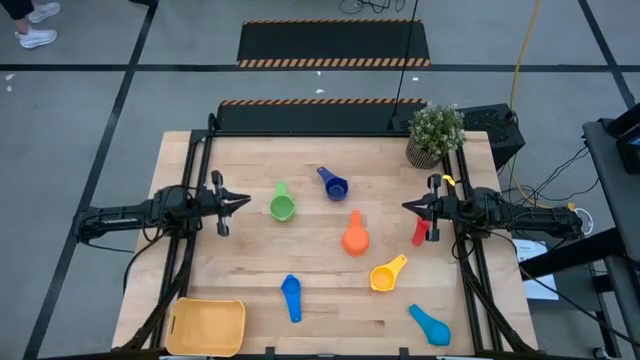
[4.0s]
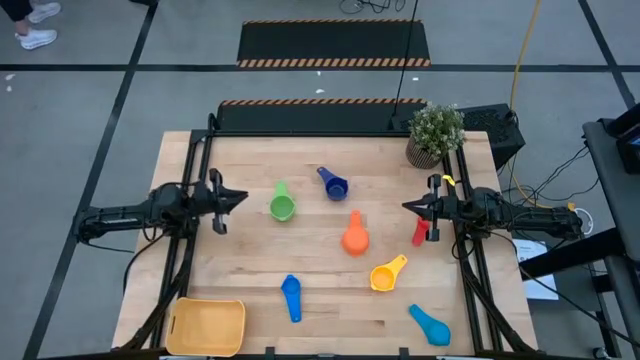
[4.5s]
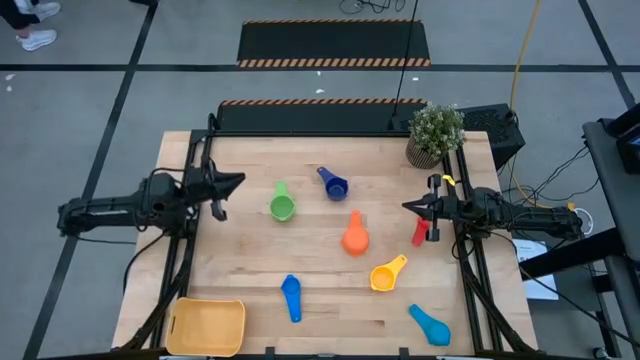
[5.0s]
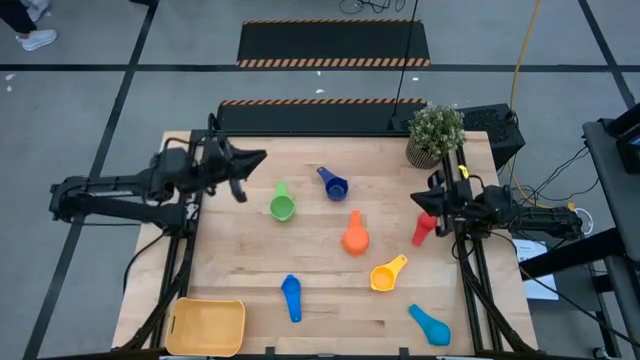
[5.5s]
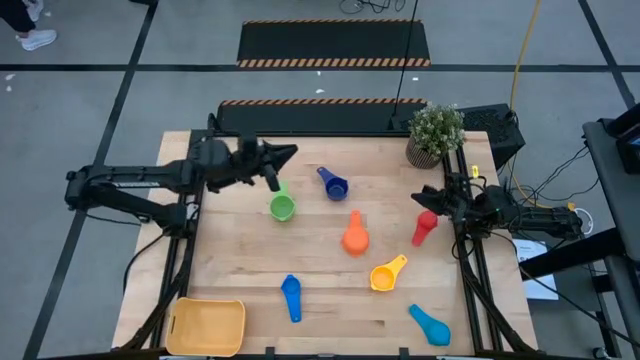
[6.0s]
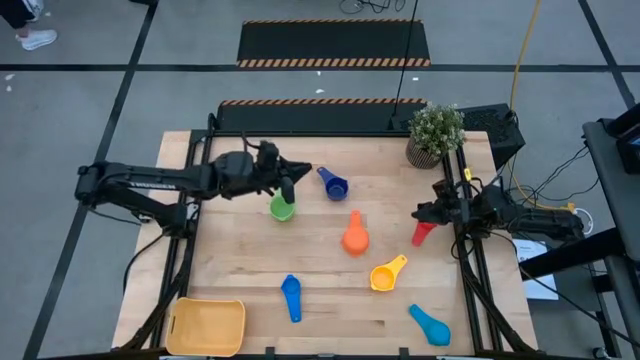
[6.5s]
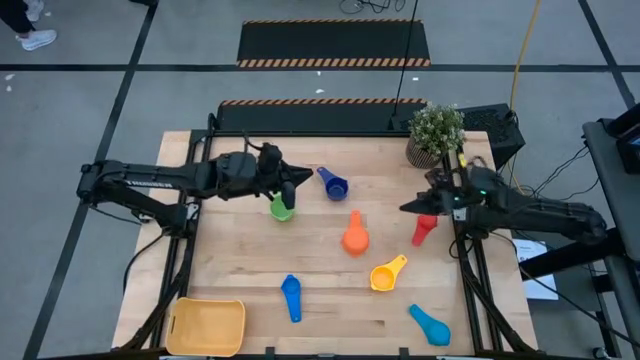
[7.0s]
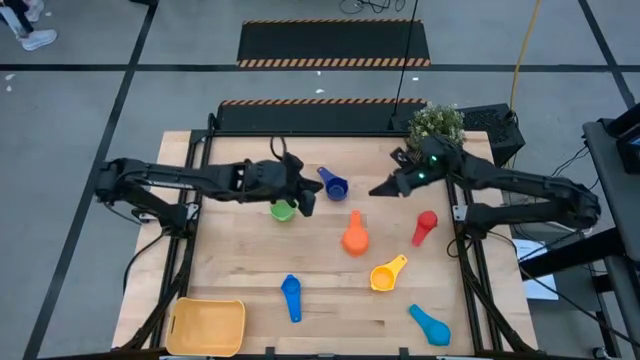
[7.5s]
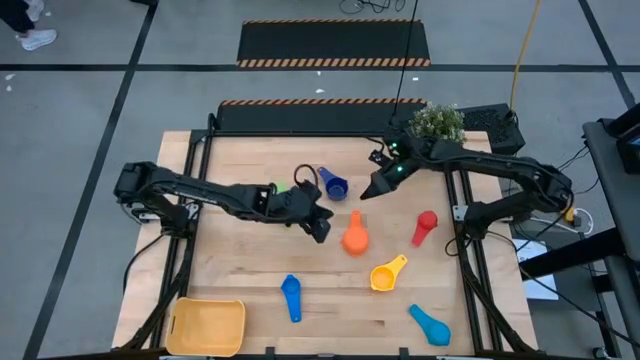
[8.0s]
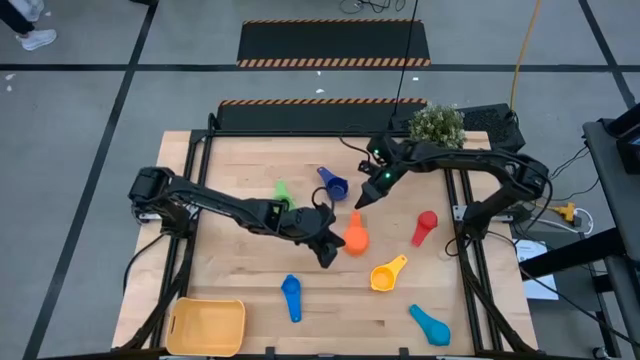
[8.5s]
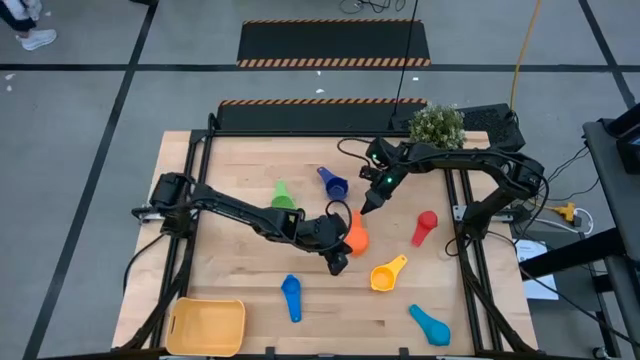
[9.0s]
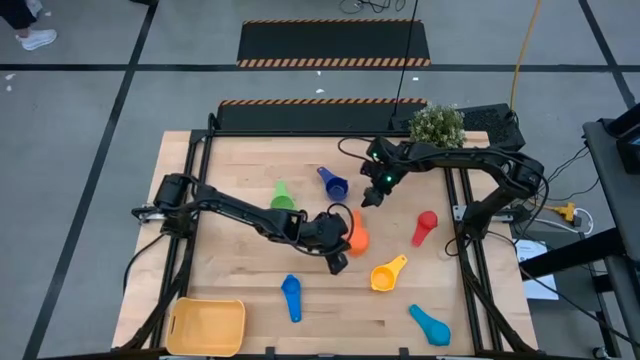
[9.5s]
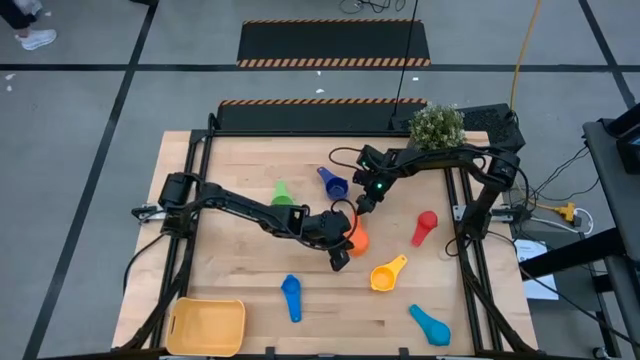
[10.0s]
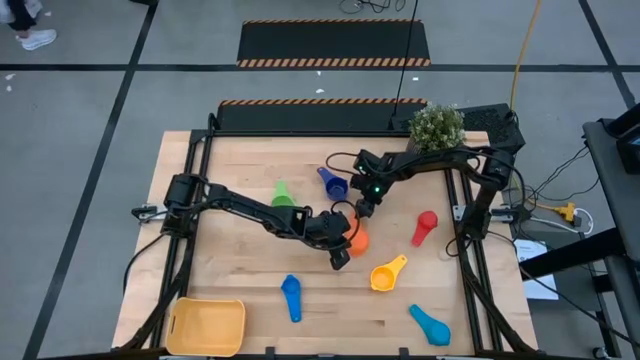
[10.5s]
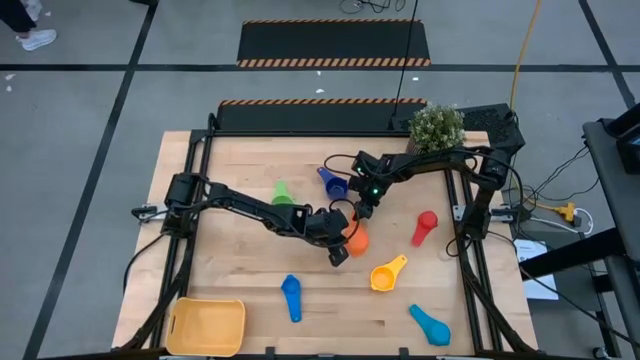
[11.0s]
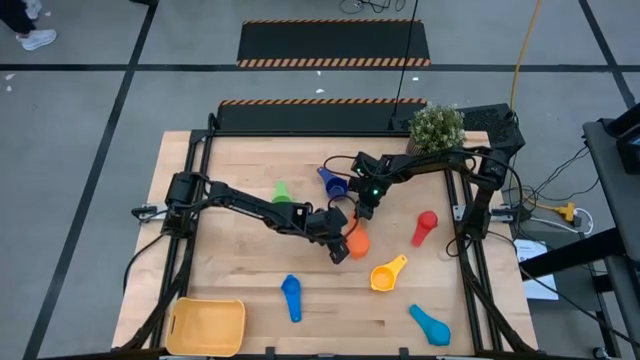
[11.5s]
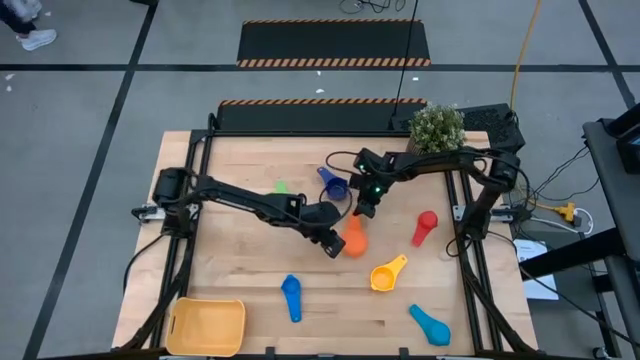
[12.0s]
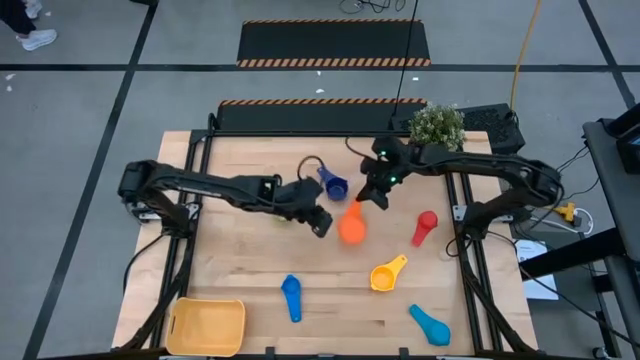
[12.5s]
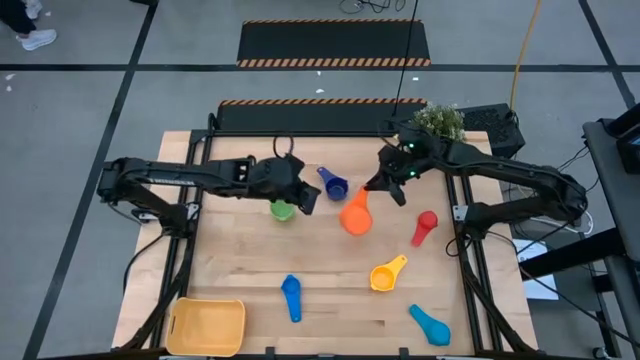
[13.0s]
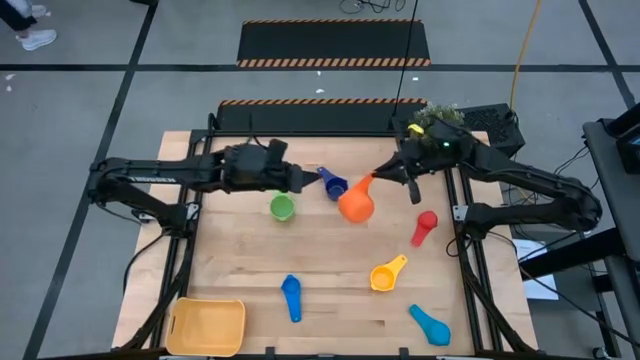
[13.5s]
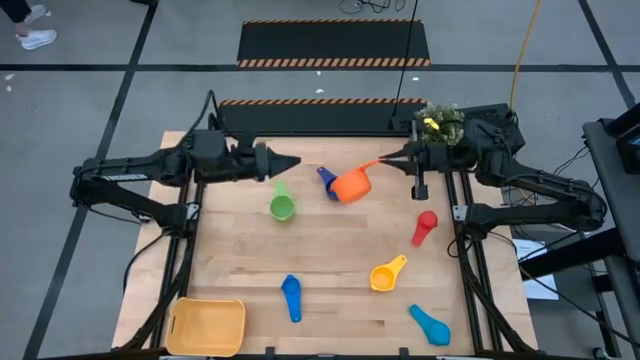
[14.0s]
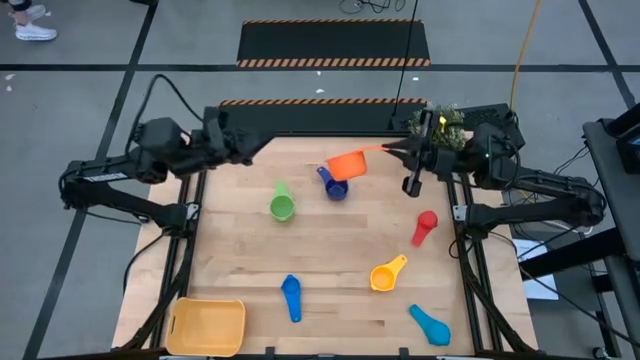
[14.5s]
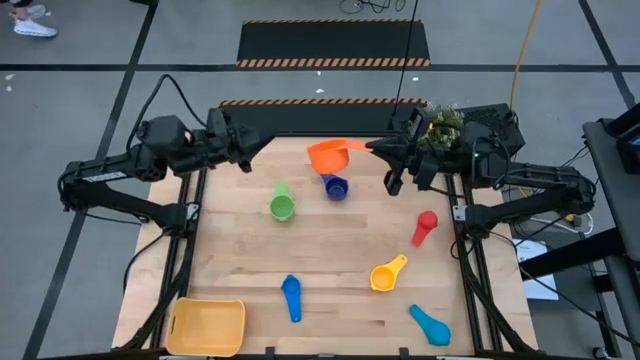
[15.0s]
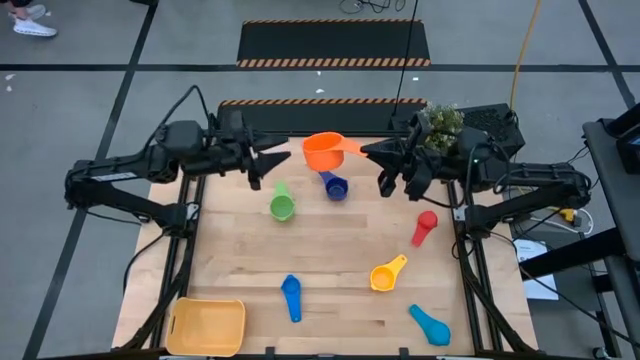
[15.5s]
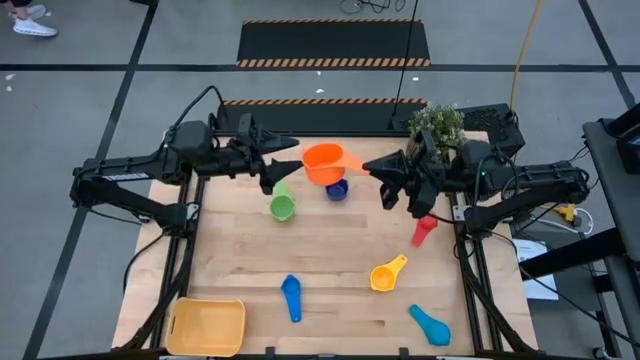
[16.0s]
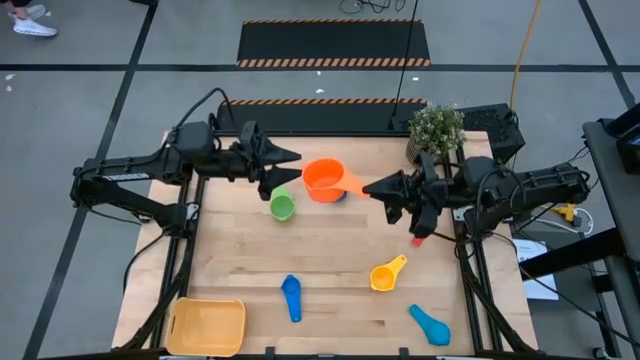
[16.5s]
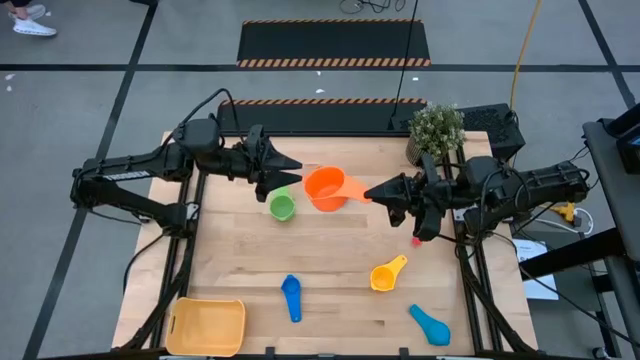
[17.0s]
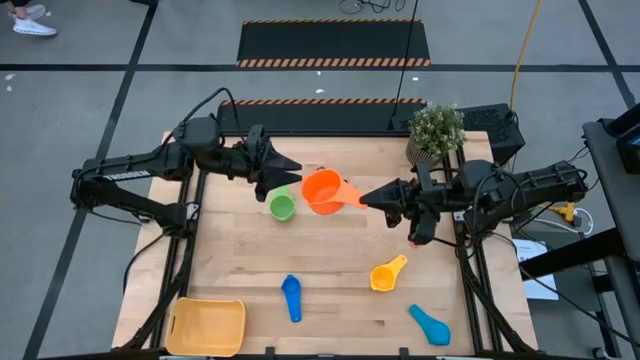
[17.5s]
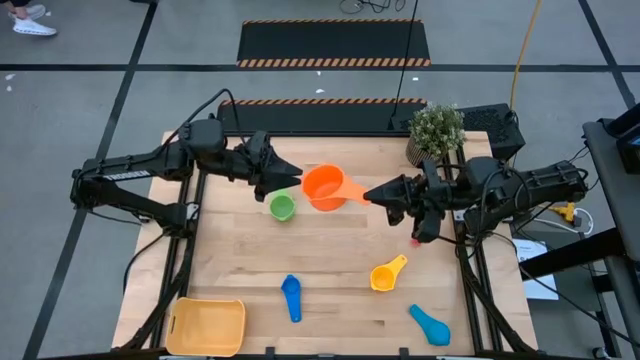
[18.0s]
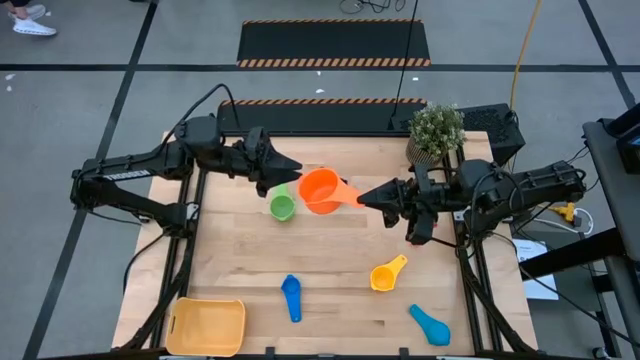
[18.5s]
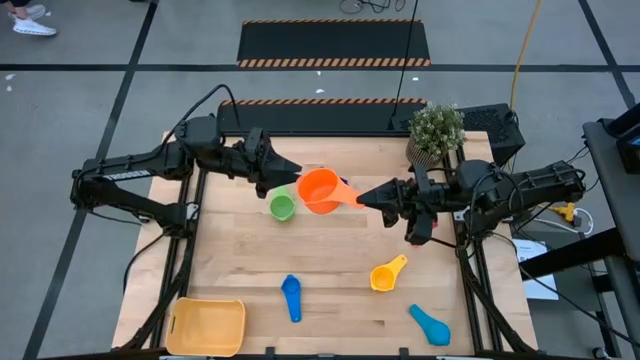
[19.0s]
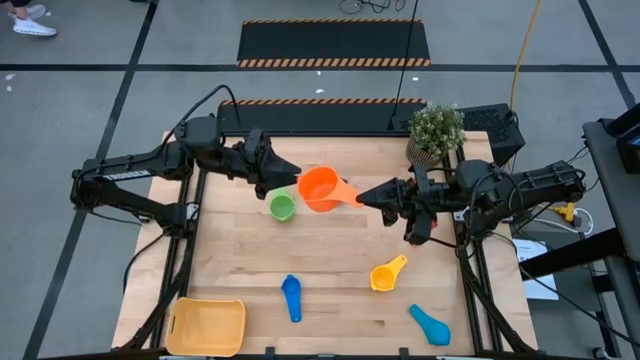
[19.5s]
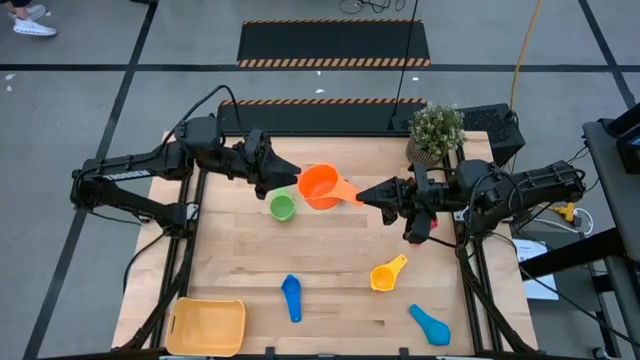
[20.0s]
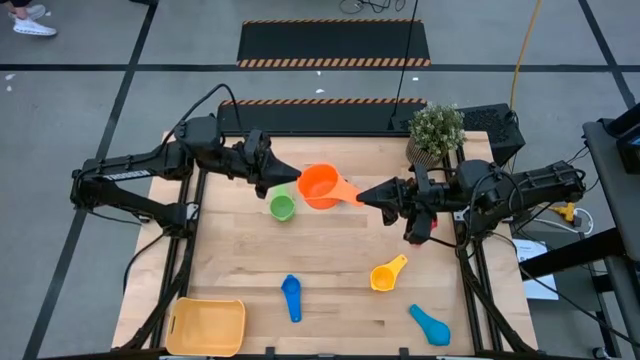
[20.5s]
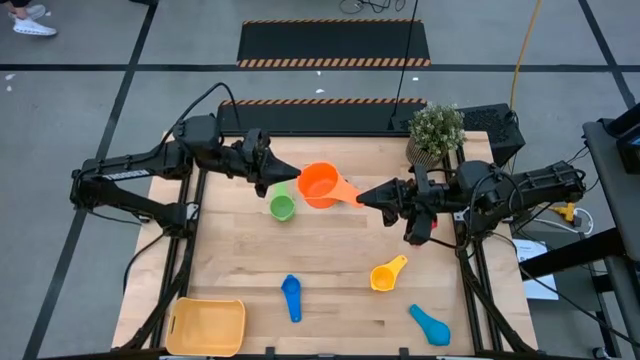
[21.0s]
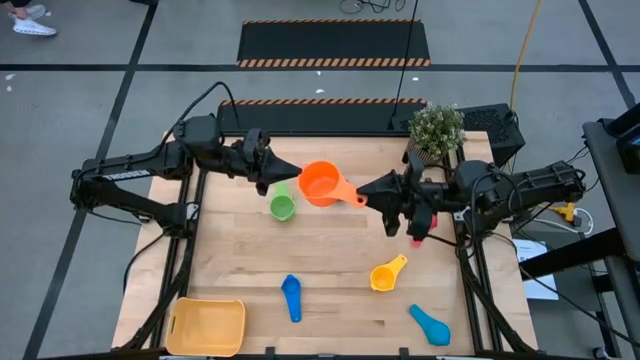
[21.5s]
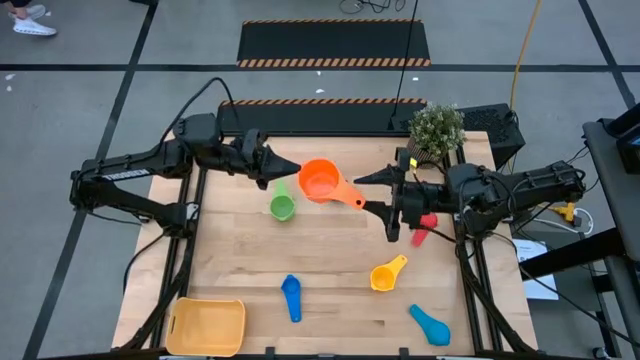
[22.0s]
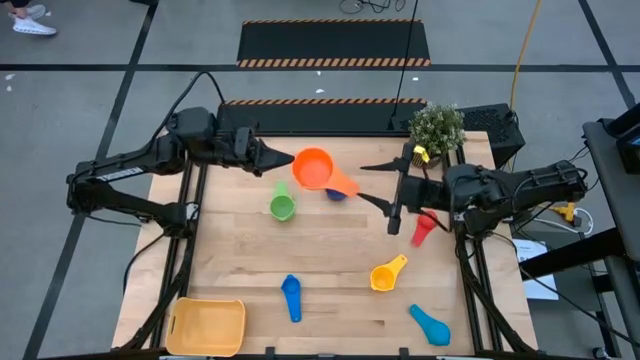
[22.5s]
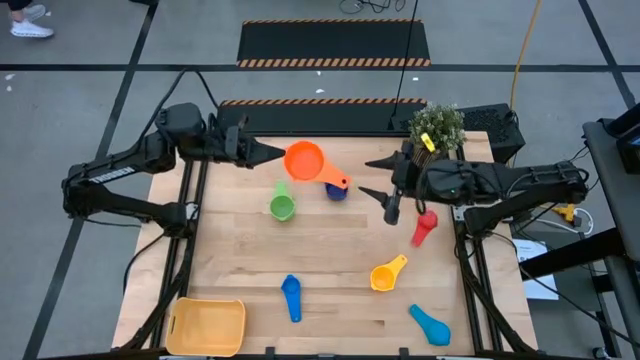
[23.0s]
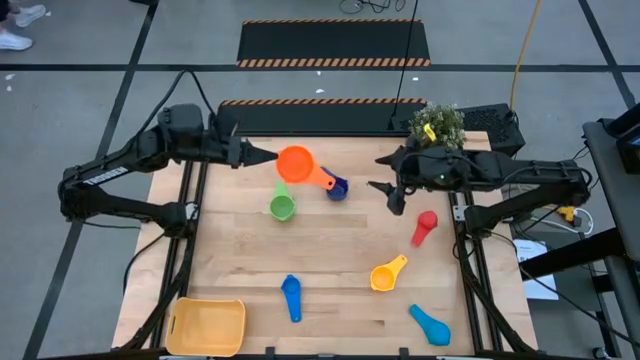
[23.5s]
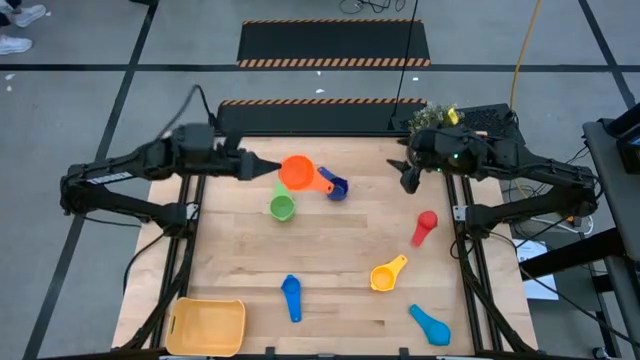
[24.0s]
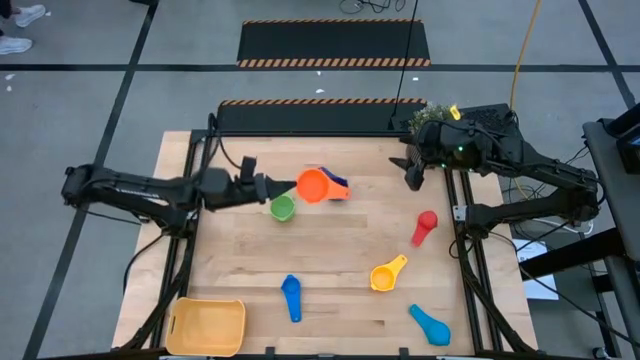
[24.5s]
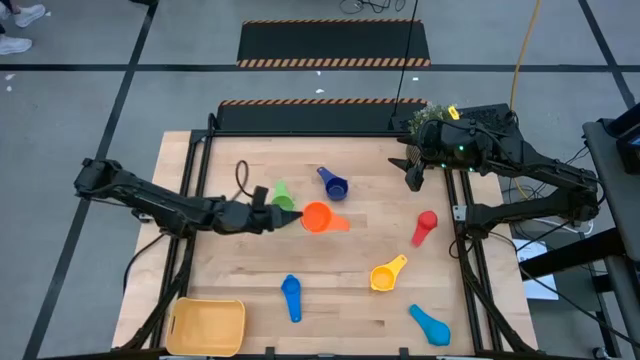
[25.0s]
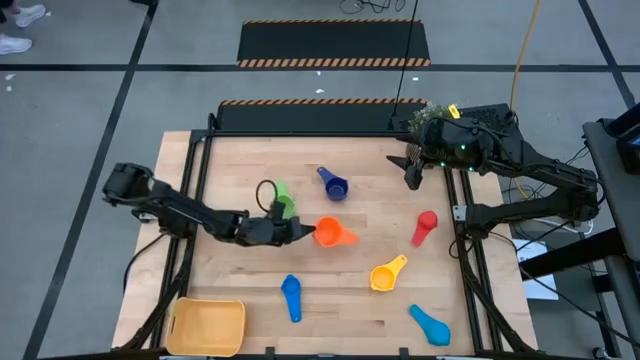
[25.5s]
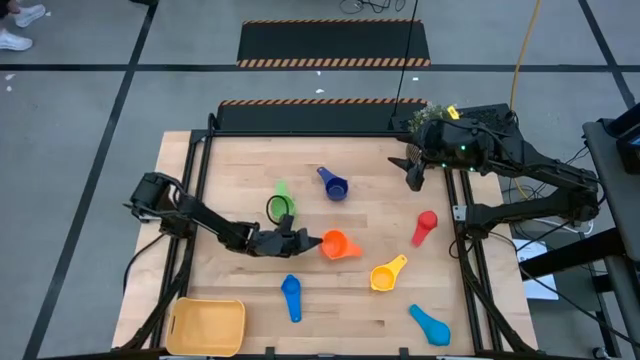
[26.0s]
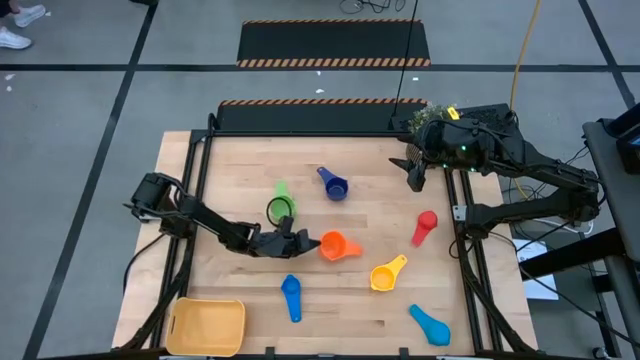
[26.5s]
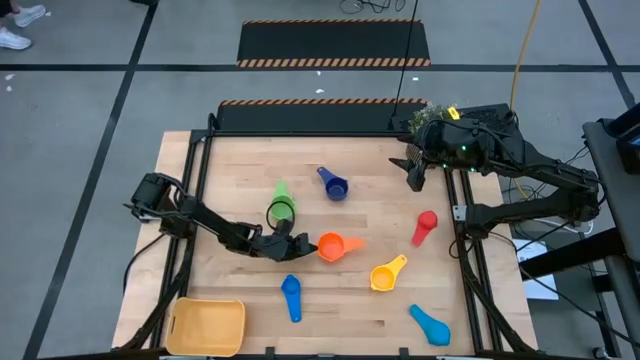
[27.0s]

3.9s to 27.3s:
Task: Nest measuring cups in basket
Put the orange measuring cup on the table upright
